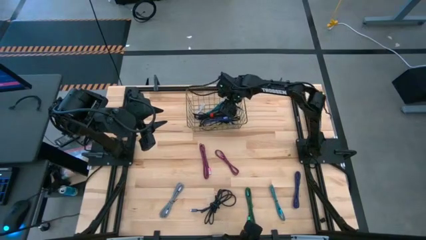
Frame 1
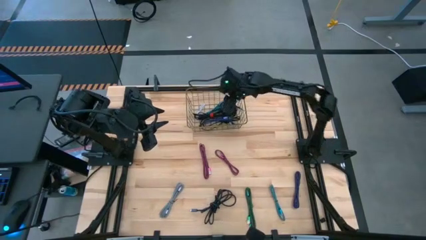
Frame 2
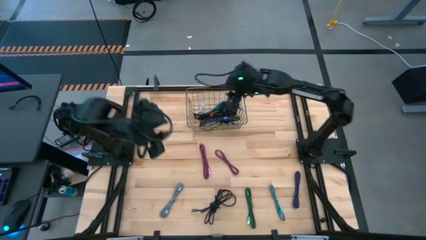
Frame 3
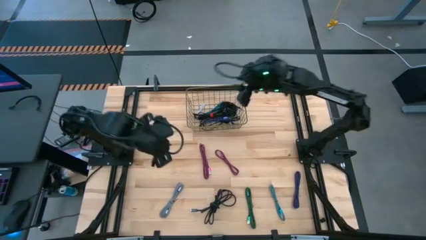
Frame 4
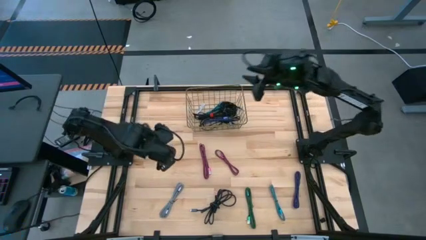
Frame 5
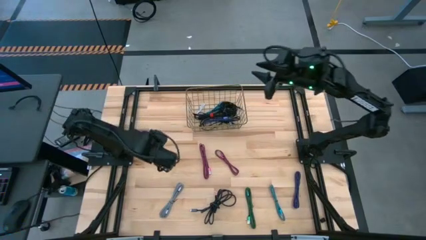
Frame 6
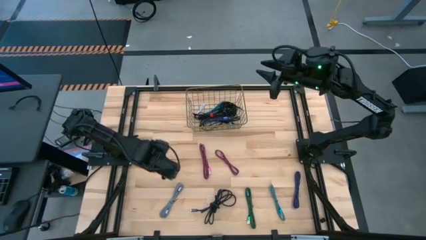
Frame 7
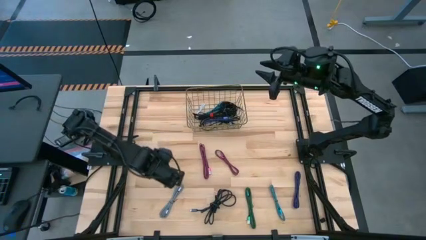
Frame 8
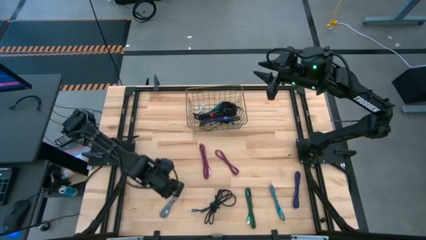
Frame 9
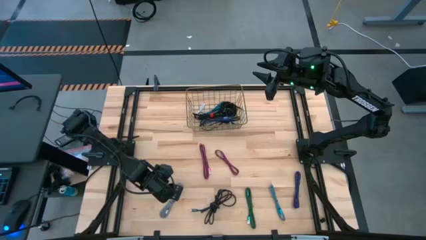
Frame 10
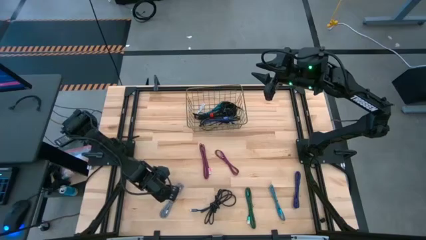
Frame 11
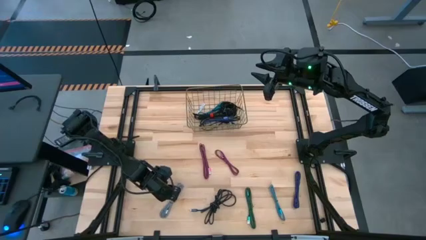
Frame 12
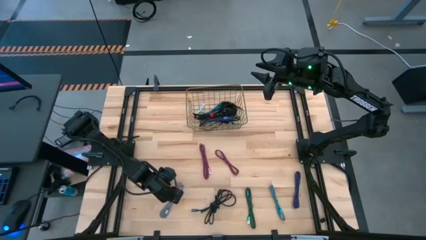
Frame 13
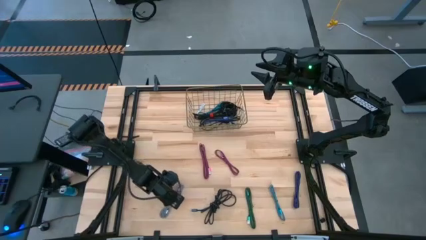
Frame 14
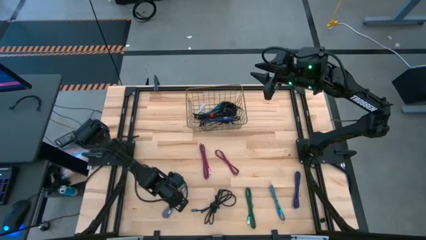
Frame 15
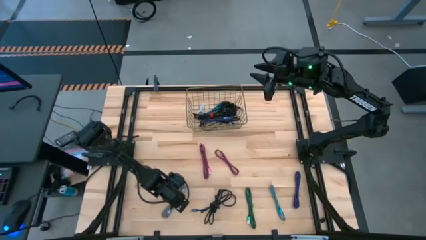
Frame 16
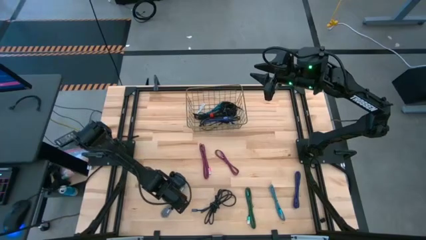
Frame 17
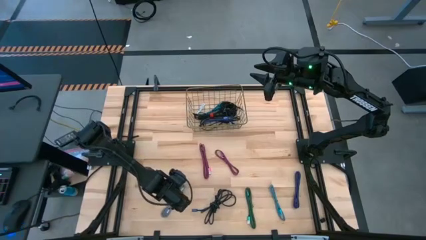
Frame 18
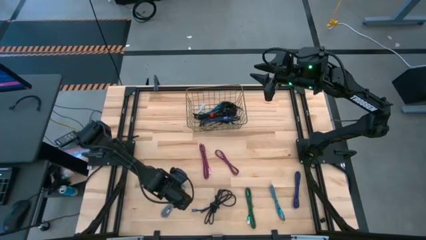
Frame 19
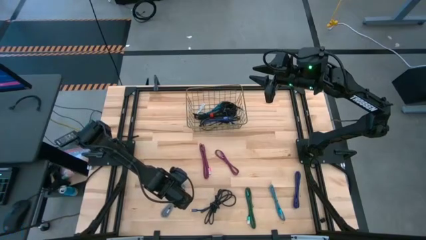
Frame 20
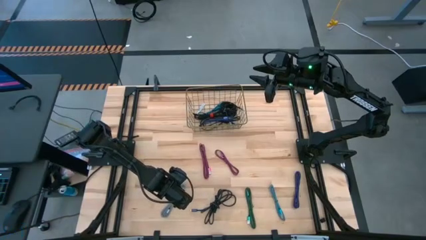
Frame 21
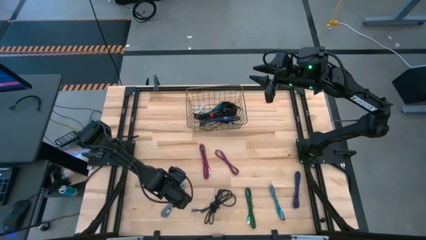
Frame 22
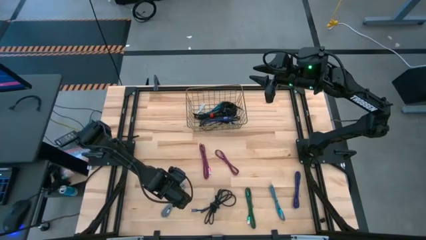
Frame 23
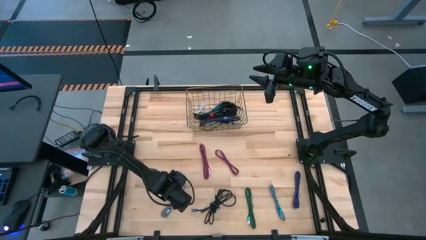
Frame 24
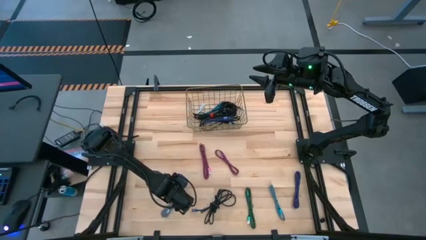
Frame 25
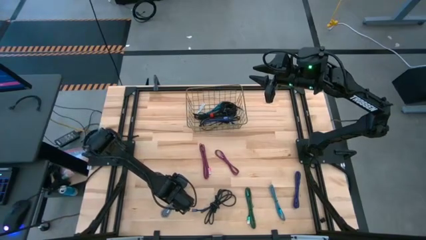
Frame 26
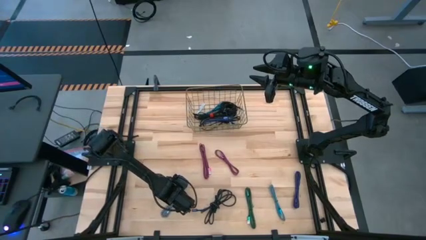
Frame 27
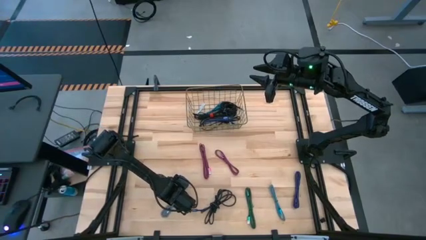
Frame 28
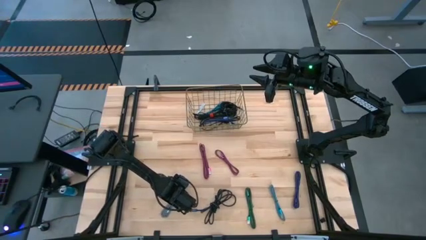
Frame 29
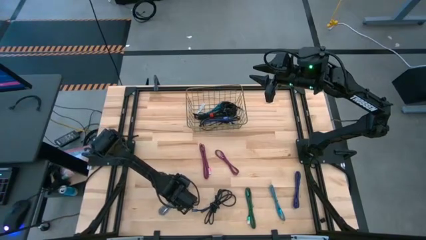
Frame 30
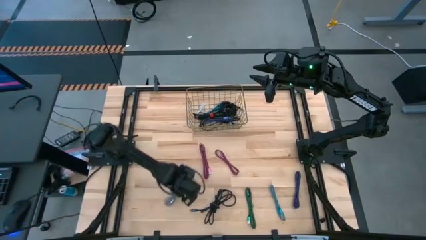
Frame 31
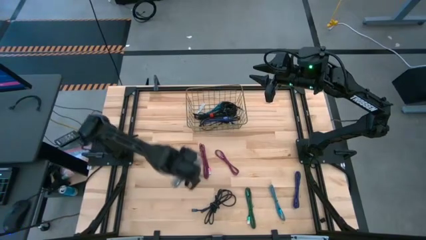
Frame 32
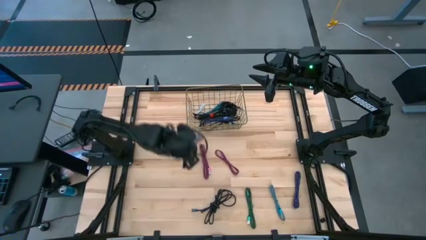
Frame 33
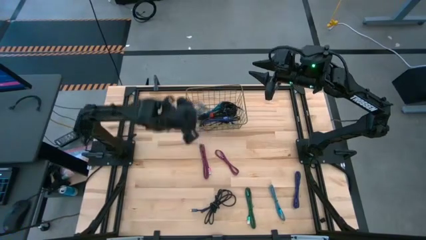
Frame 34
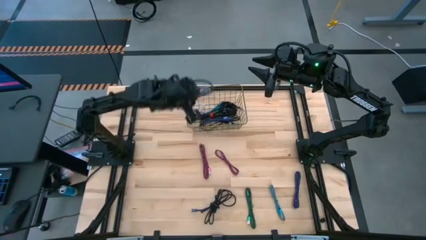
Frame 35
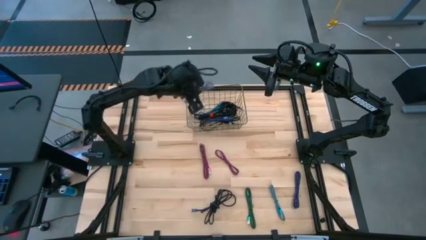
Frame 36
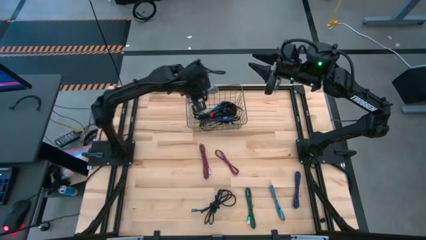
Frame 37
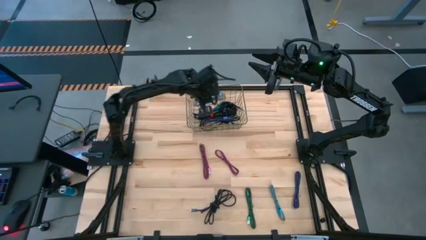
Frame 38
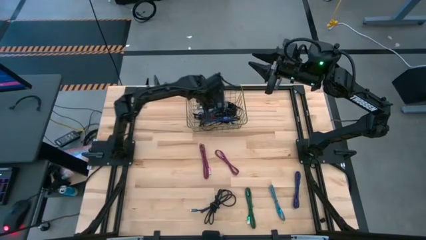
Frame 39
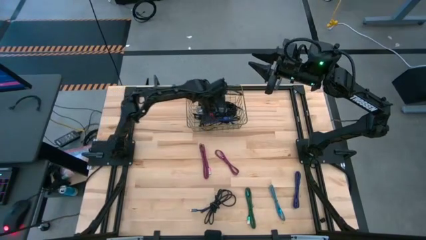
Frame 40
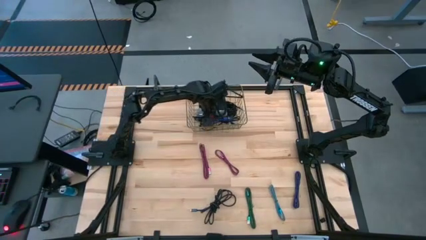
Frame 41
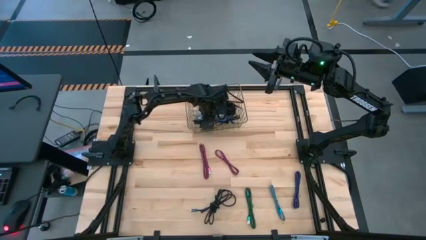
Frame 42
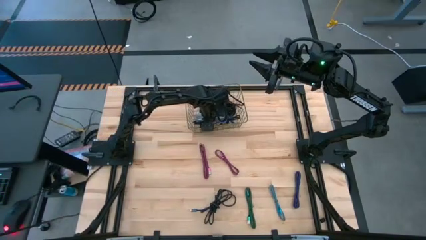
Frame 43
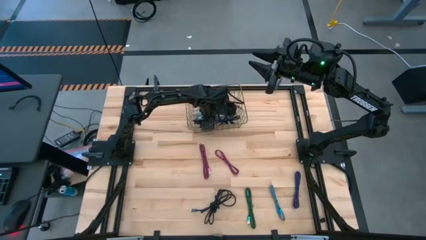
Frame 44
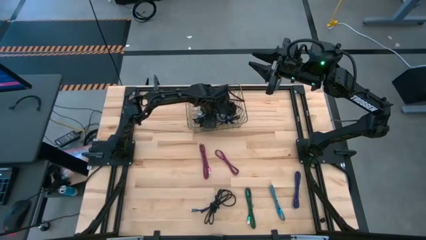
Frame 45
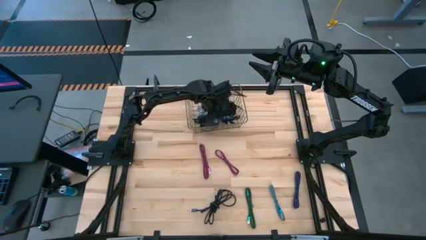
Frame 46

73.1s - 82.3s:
Task: Pick and place USB-C Cables
Put the gray charger cable into the wire basket

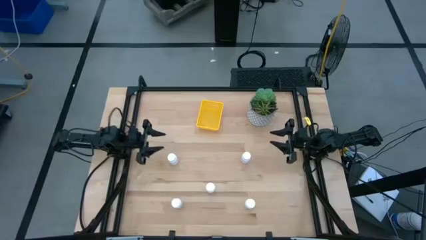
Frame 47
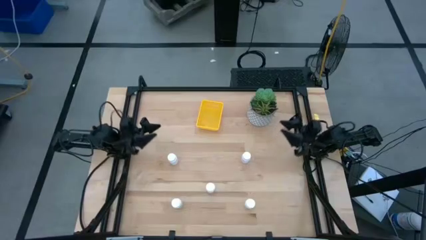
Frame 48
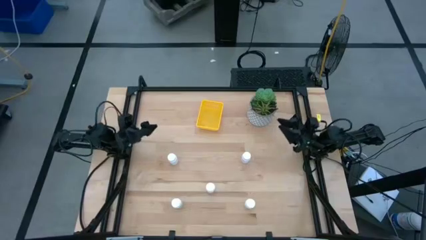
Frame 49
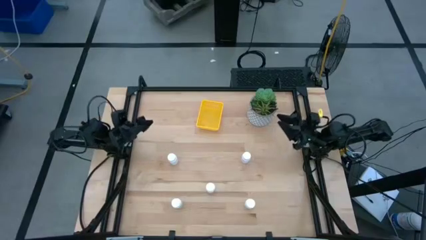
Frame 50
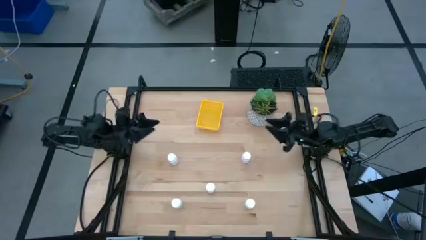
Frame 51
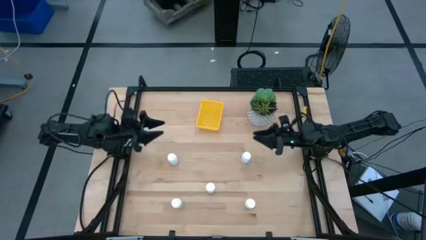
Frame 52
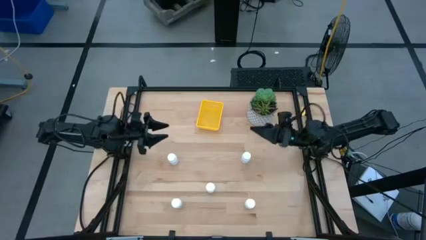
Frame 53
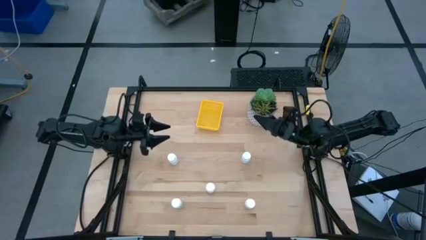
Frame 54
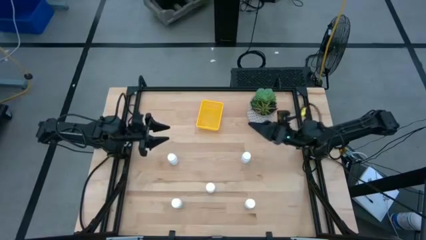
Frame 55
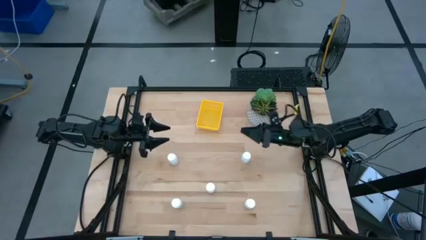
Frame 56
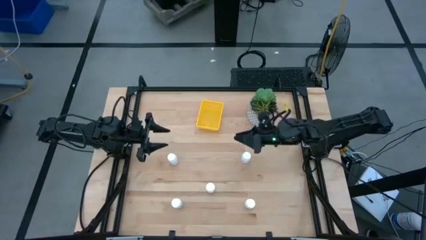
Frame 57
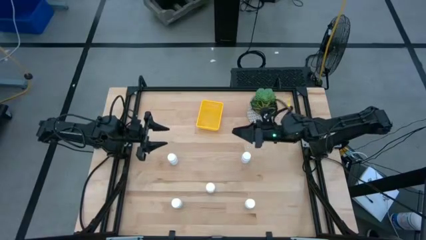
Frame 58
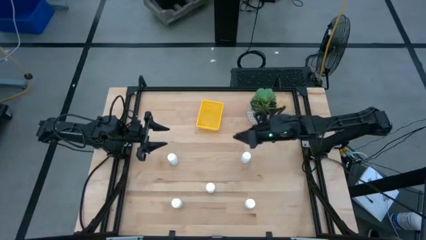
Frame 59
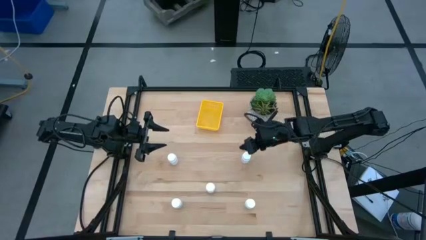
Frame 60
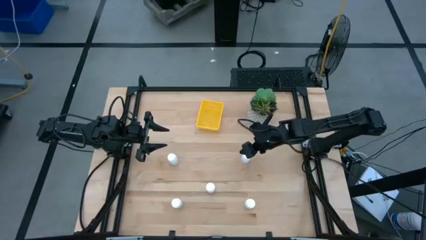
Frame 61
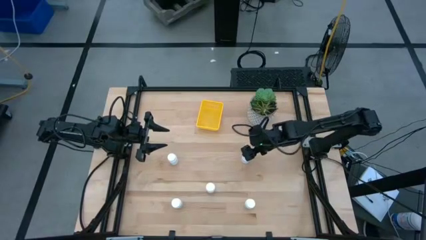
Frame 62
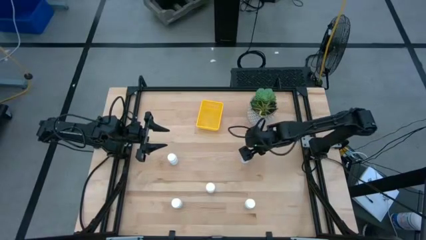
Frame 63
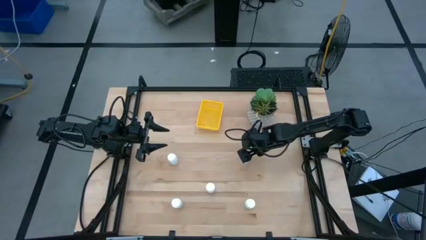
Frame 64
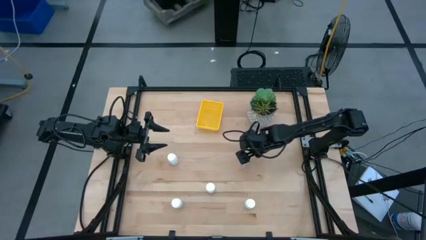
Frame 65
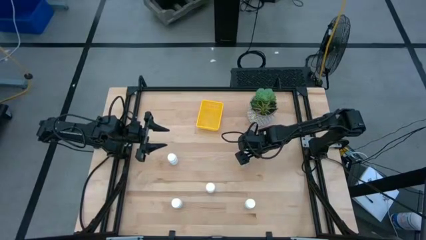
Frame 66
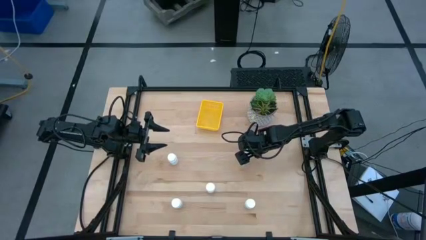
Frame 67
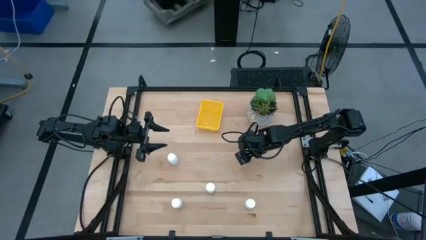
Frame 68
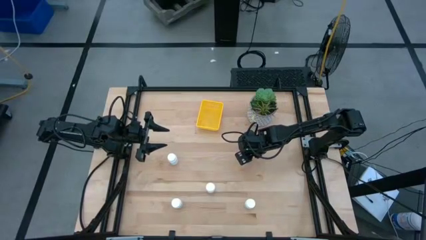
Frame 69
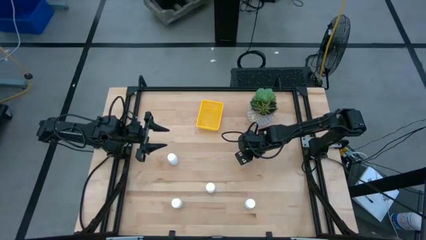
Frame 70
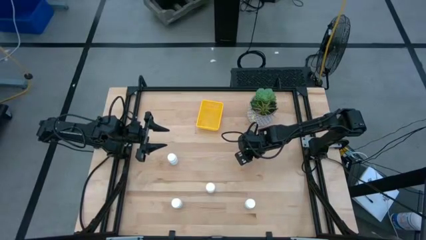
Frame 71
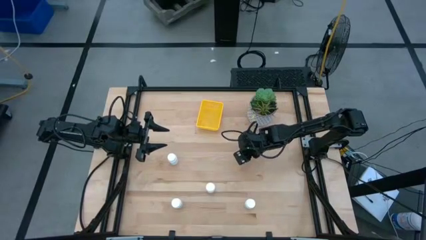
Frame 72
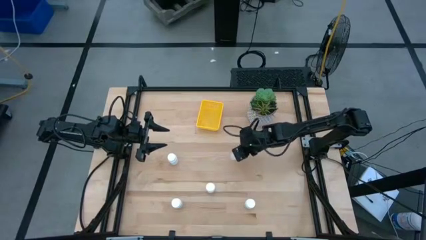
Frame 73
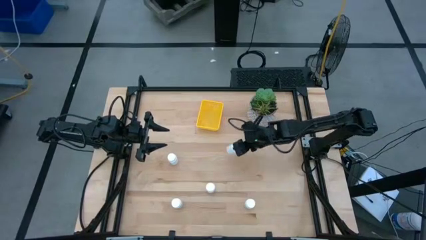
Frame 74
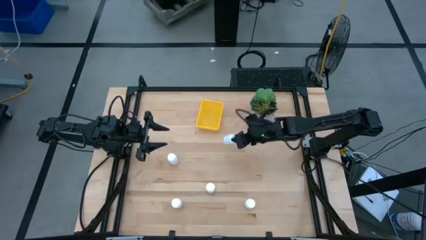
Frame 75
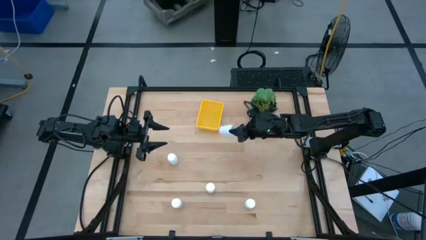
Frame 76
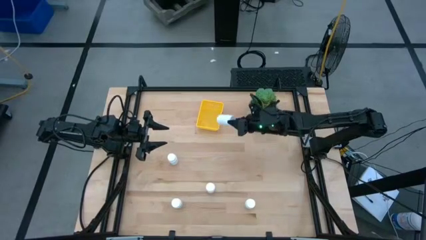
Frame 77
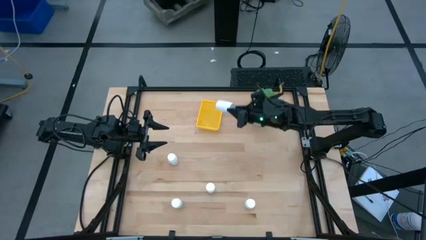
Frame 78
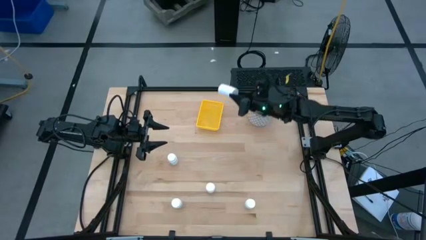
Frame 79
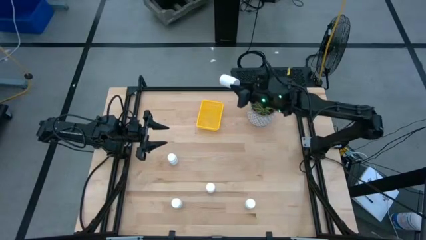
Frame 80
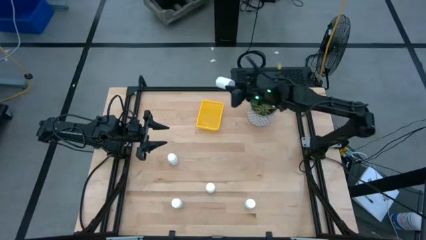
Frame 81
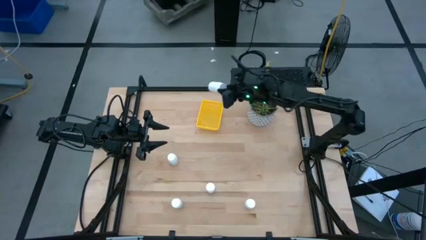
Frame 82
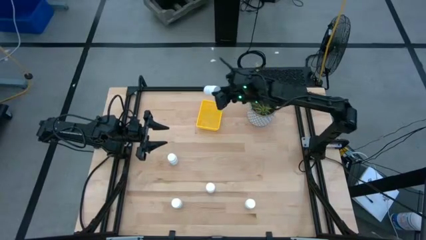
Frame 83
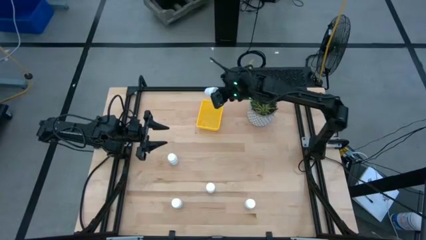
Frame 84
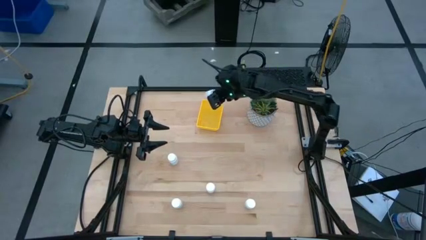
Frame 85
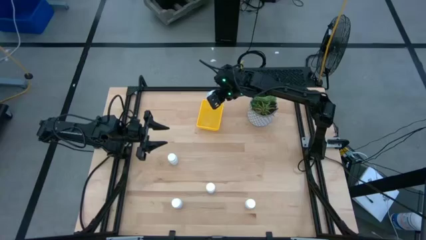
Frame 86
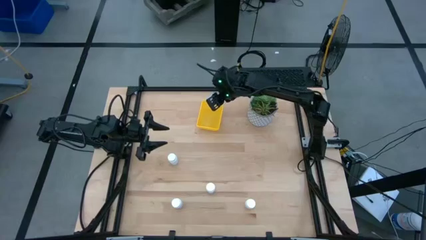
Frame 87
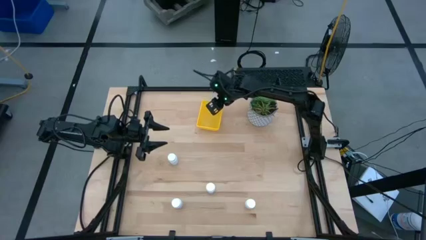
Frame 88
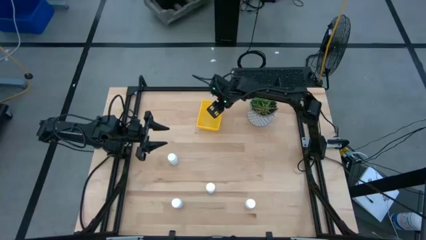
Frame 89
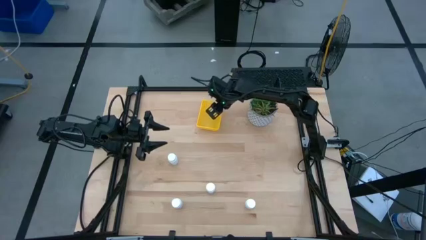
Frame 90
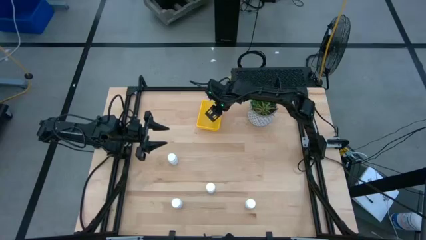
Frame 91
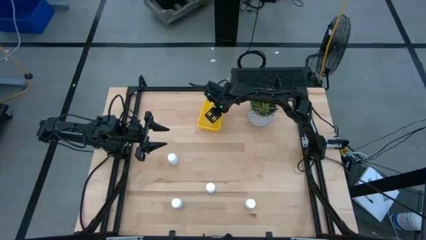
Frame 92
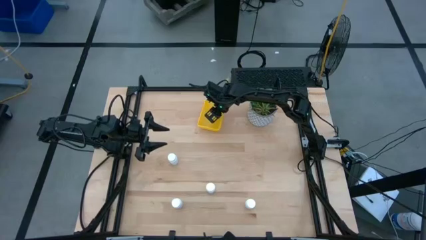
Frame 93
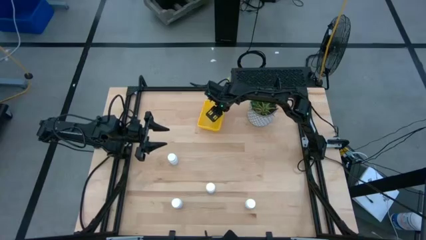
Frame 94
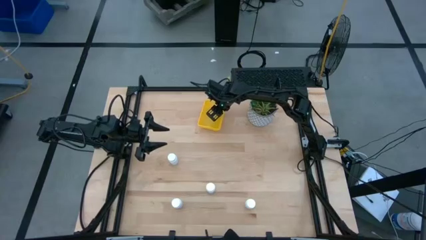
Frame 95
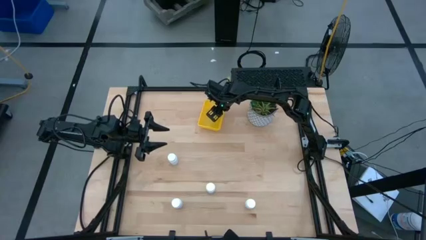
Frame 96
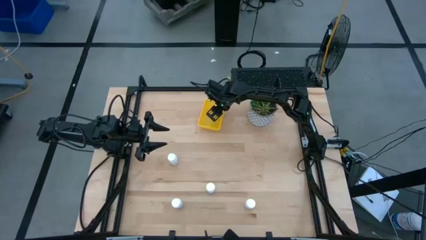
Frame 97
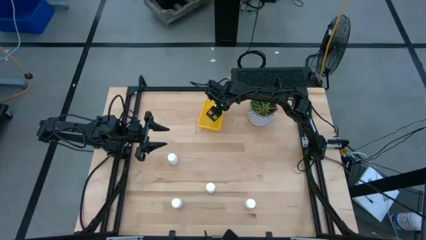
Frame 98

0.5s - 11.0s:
Task: Pick and place pill bottles into a basket
Put the white pill bottle into the yellow basket
